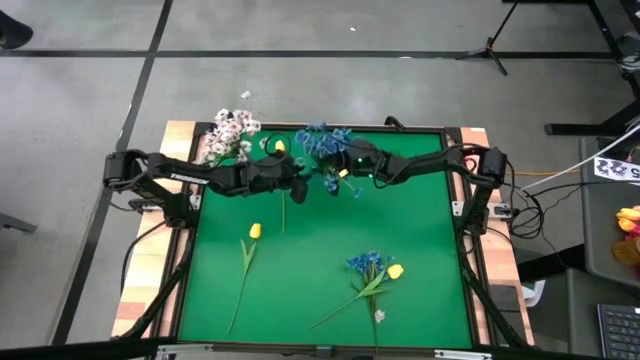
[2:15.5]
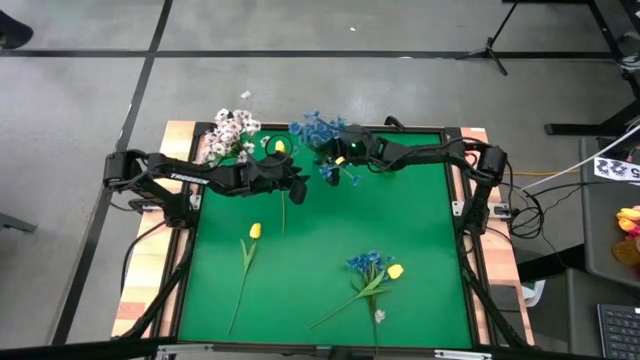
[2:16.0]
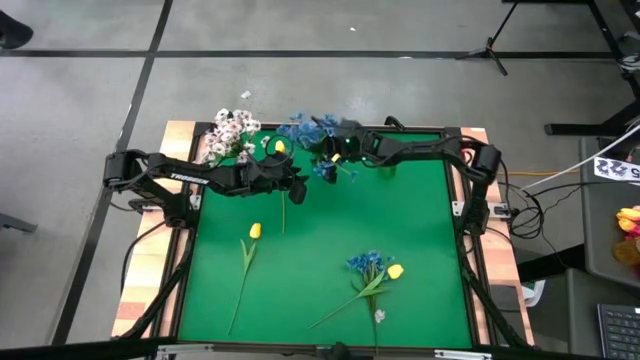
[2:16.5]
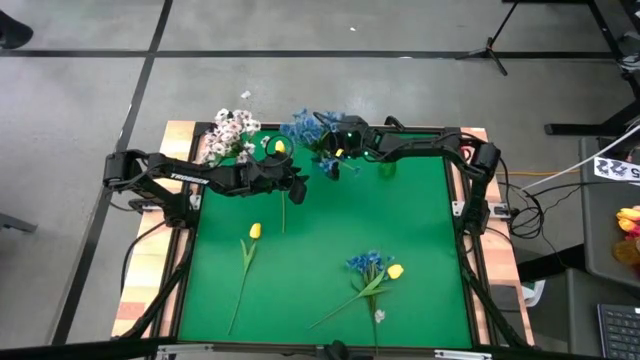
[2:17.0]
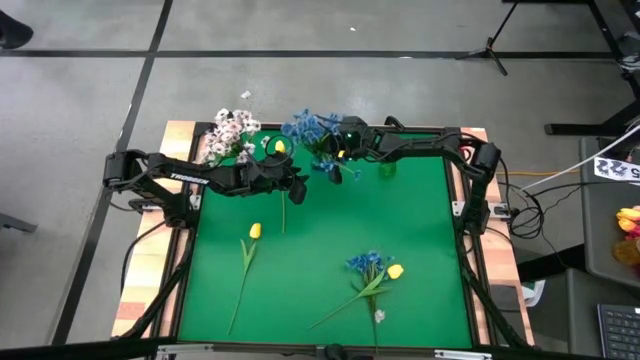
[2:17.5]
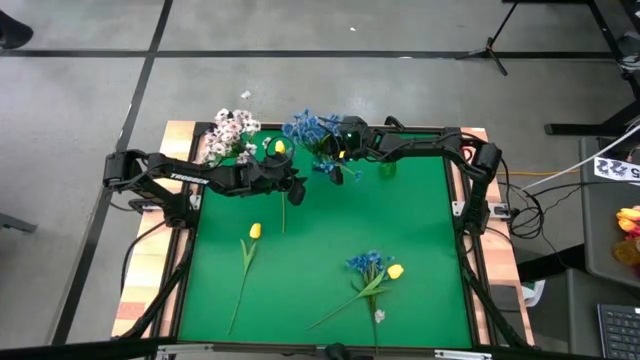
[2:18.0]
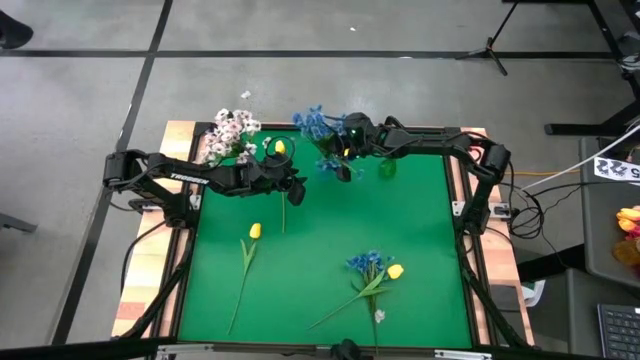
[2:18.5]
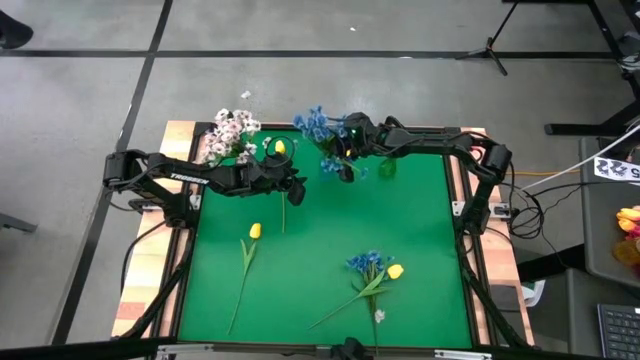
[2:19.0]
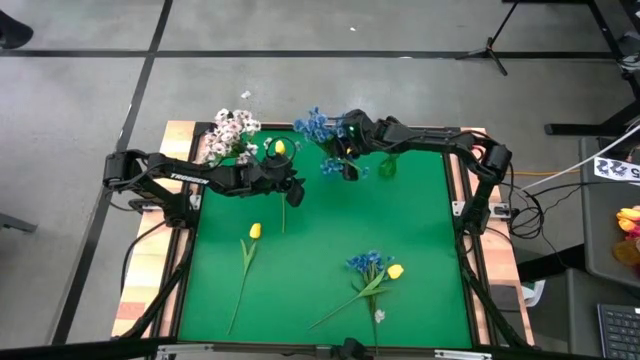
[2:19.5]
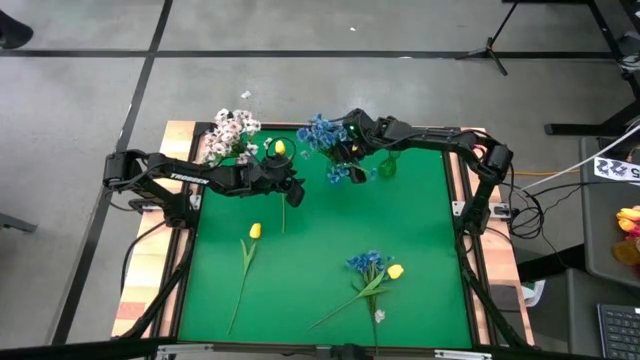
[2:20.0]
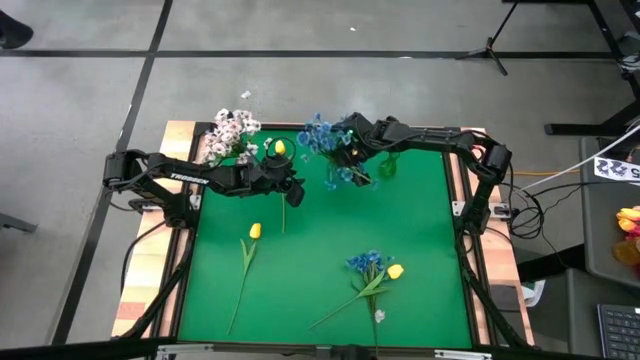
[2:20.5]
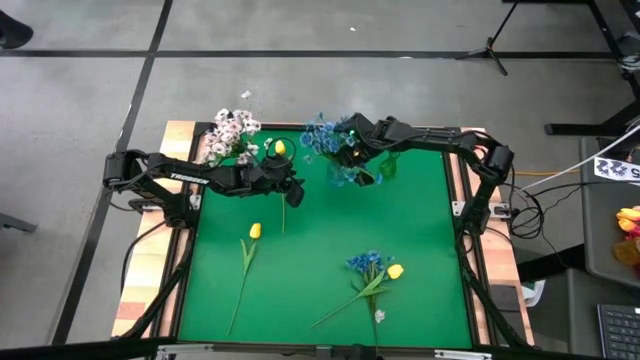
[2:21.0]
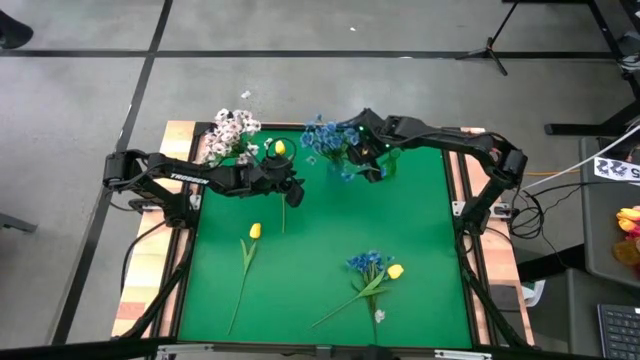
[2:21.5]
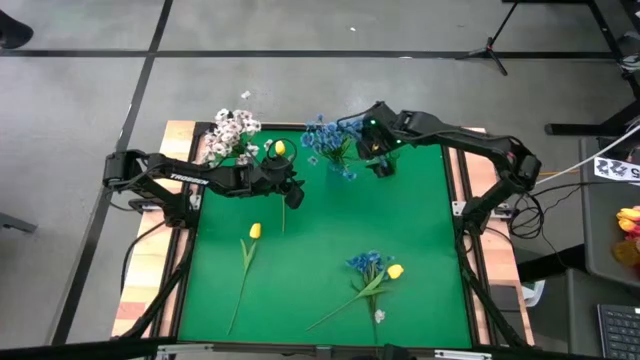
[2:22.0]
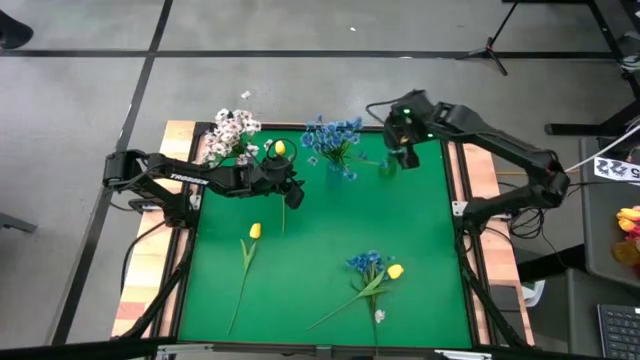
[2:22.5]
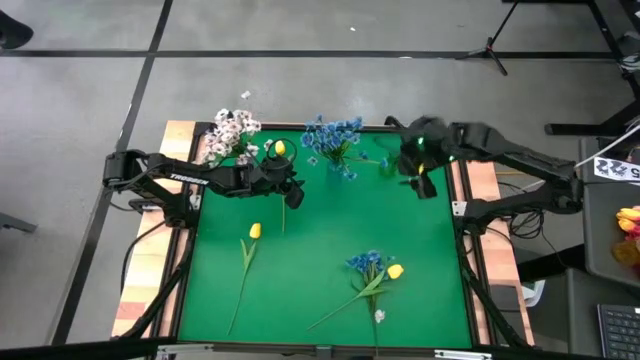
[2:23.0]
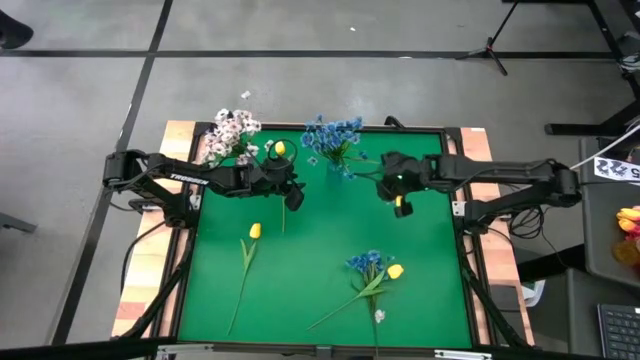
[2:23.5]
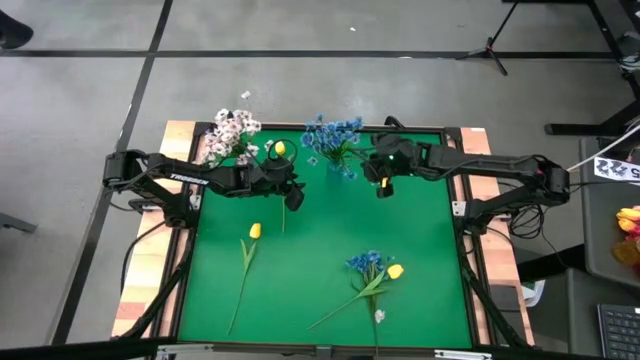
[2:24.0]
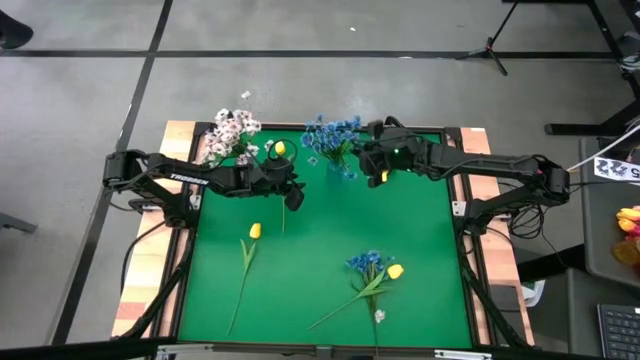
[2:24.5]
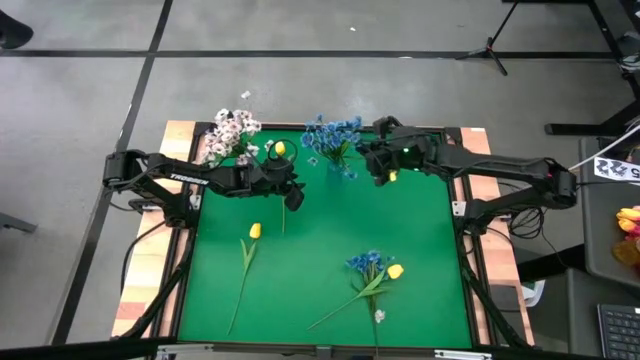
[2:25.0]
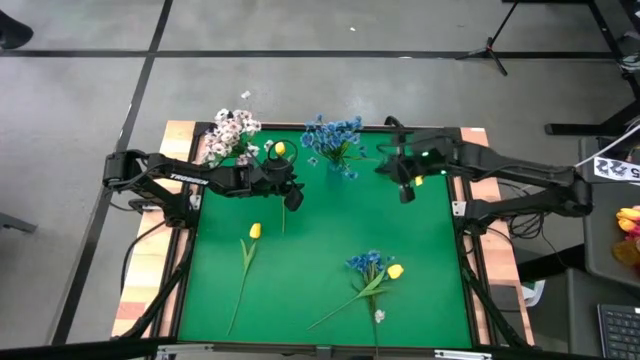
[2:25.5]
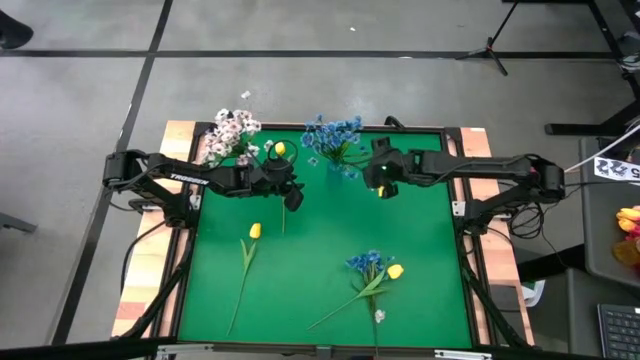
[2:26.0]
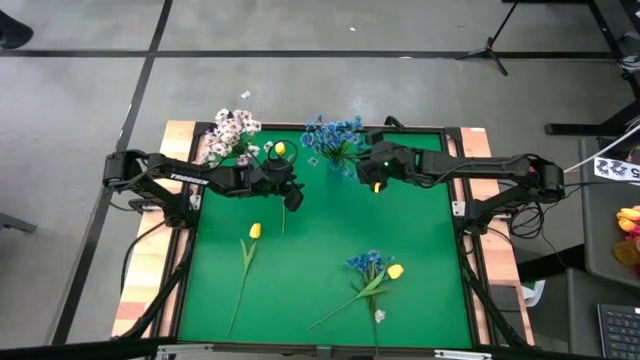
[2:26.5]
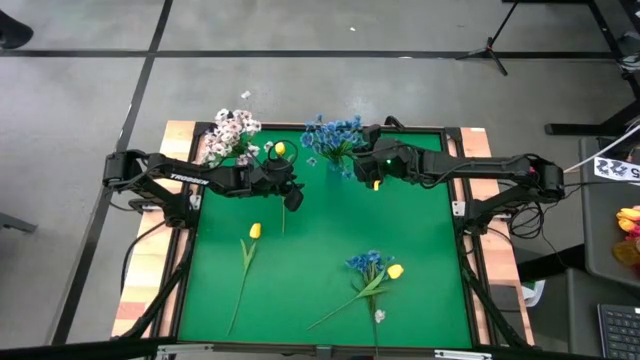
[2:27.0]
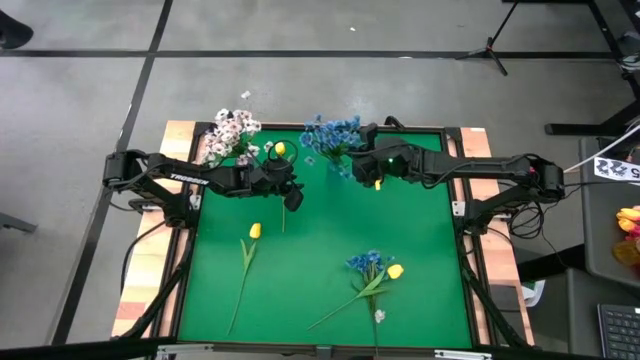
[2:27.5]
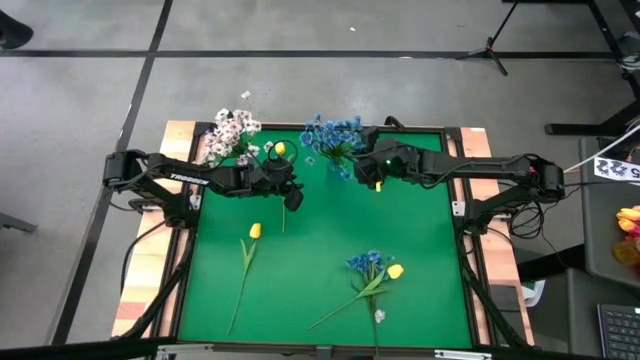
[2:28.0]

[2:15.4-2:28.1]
Task: Sort flowers into vase by color
Adjust the blue flowers in the blue vase

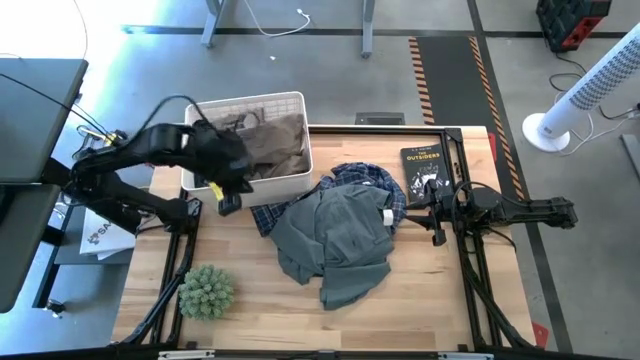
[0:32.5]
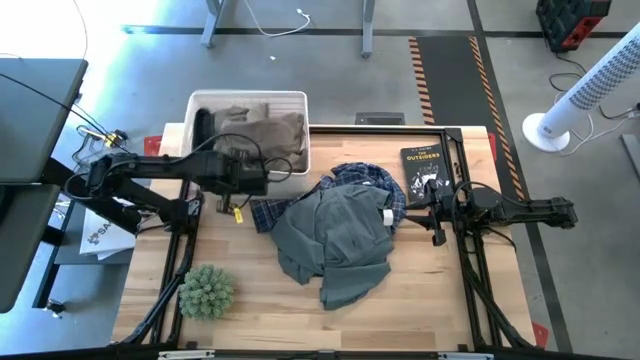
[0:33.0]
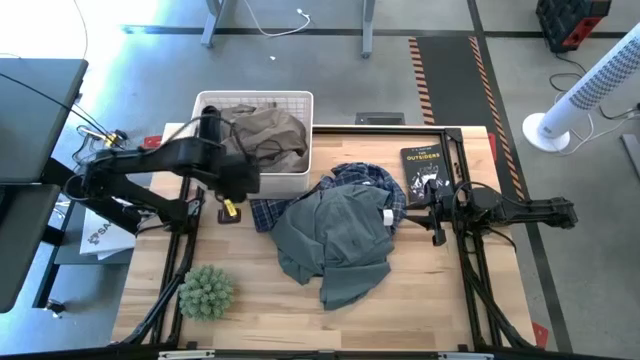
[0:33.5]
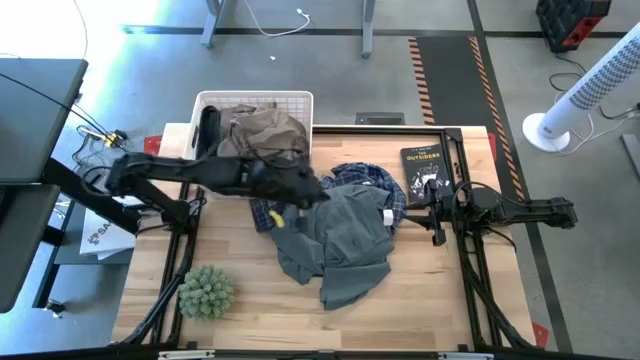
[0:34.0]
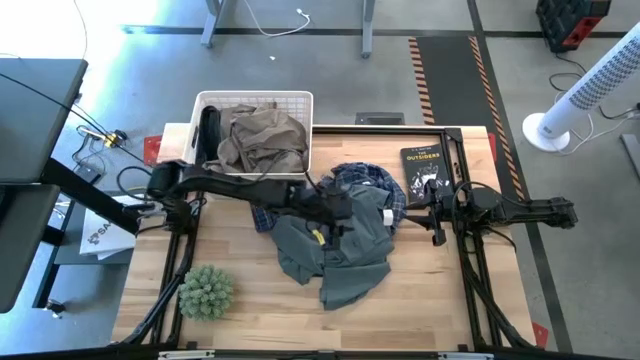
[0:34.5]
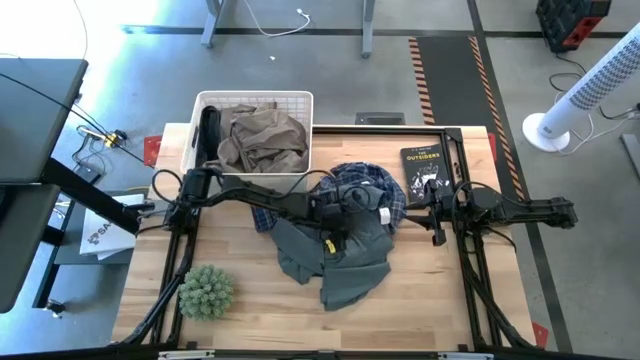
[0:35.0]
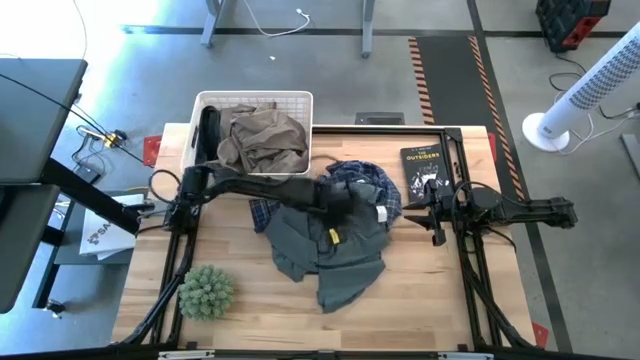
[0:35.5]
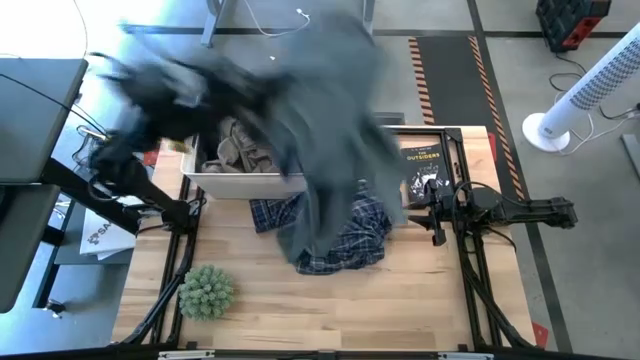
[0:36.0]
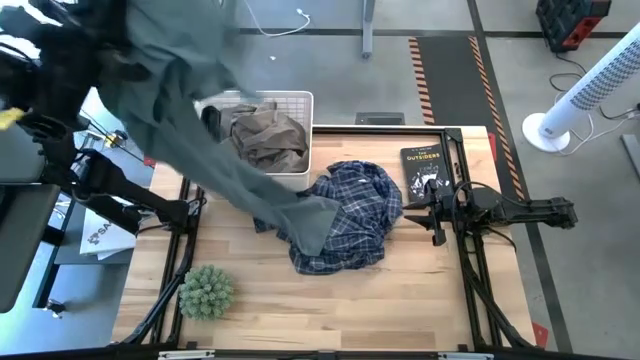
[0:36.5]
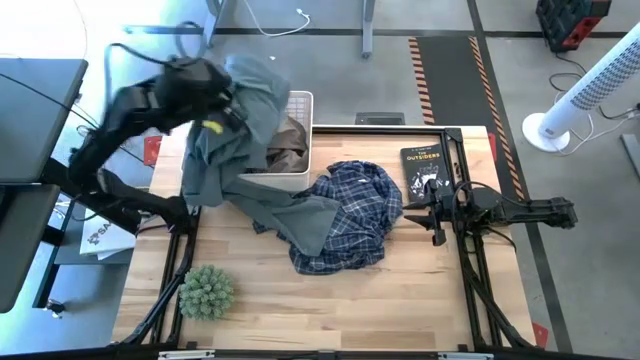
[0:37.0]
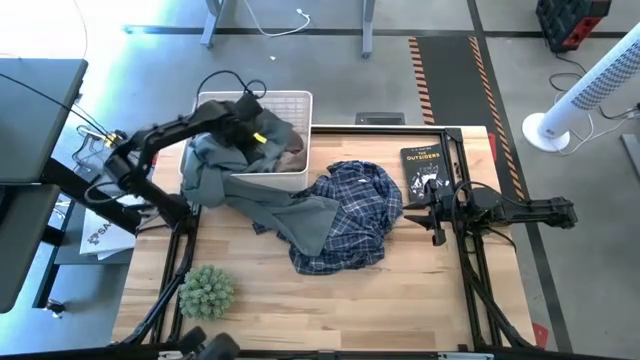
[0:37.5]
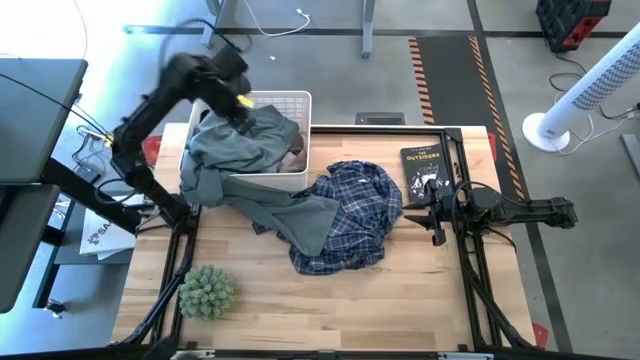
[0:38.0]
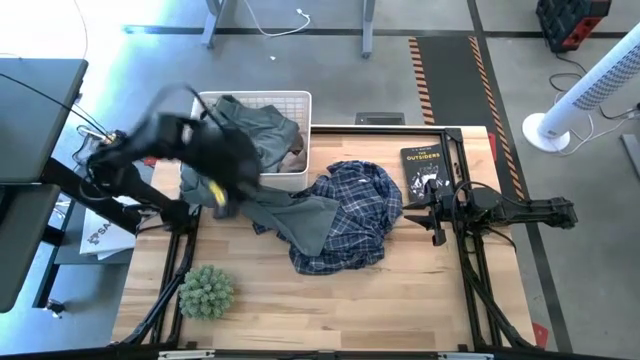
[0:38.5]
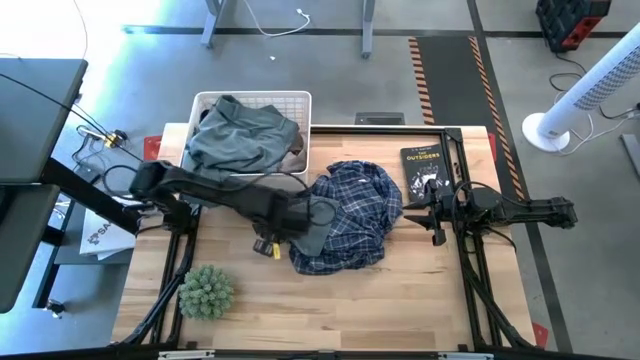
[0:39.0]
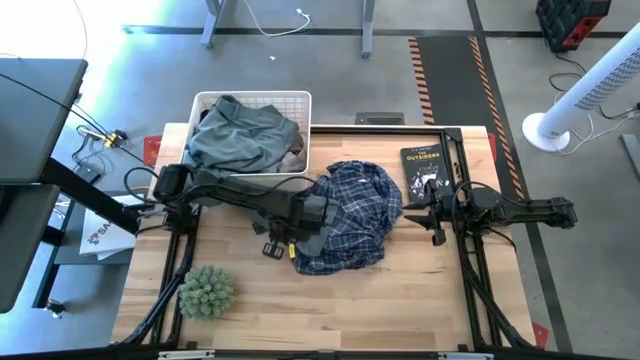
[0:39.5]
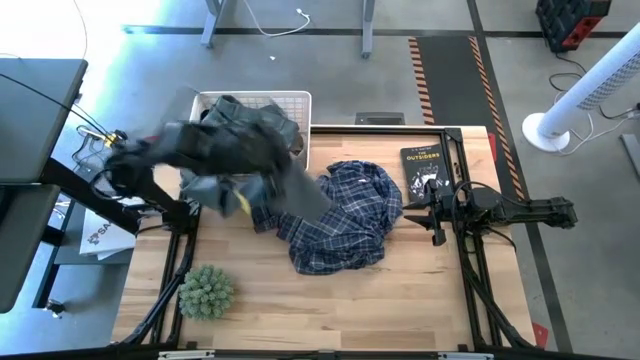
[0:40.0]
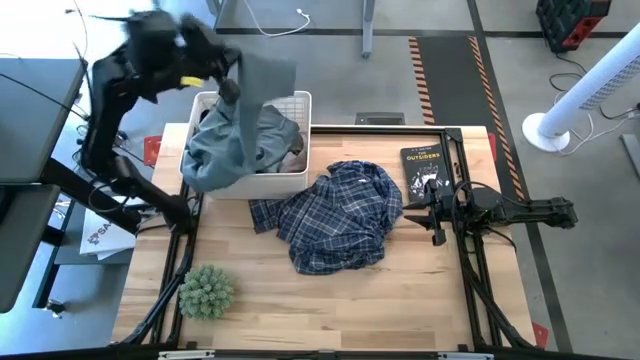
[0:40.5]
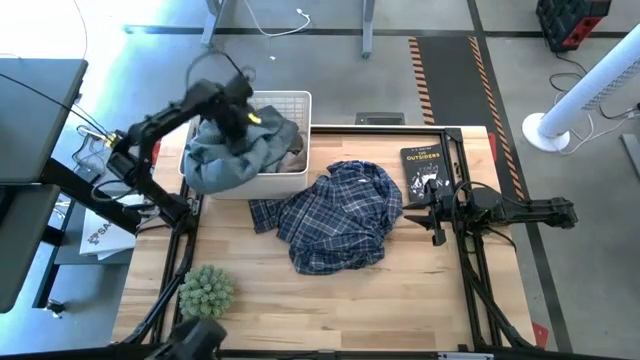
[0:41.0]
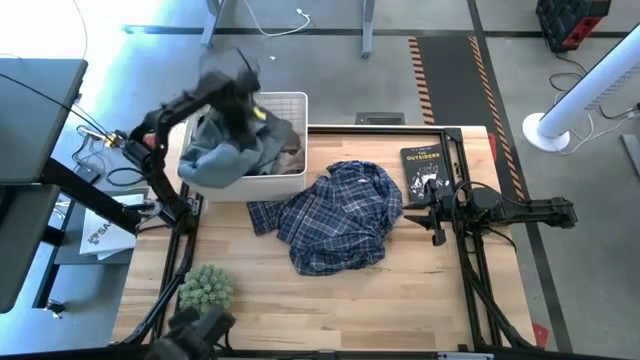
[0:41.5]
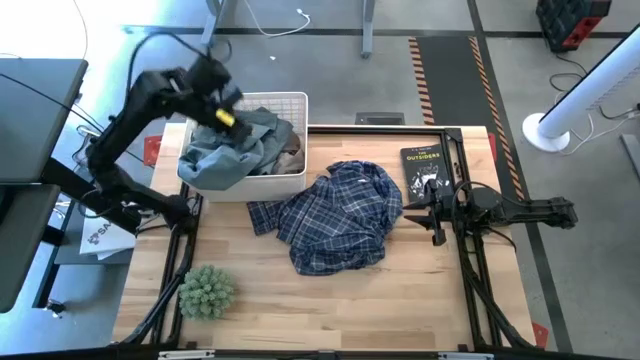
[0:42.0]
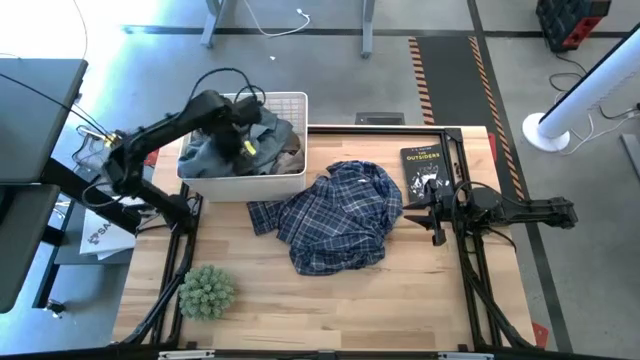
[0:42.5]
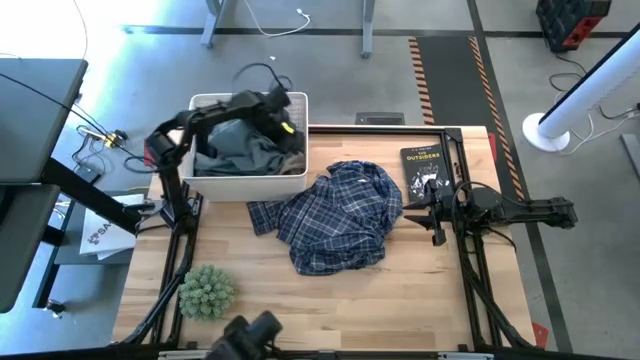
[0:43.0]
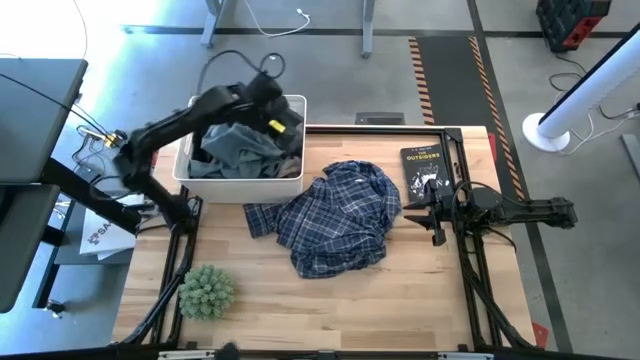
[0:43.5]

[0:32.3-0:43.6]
Task: Sort clothes
Put the grey pants into the white laundry bin
